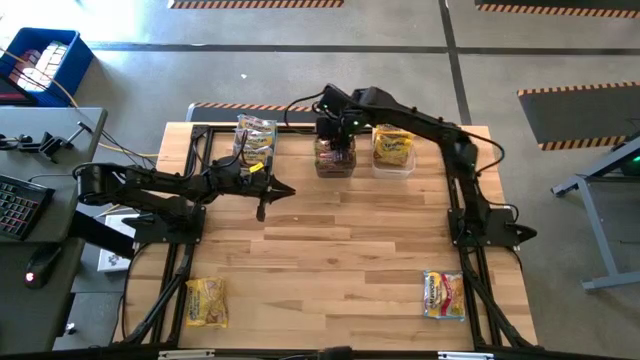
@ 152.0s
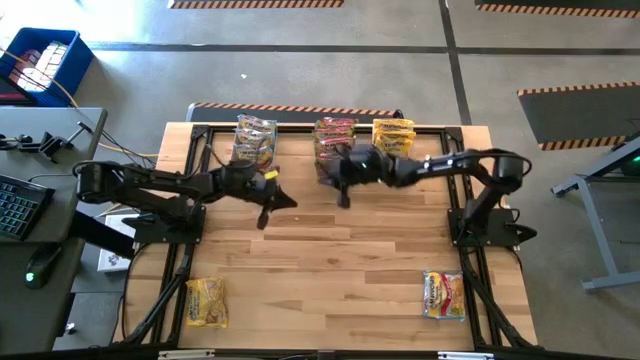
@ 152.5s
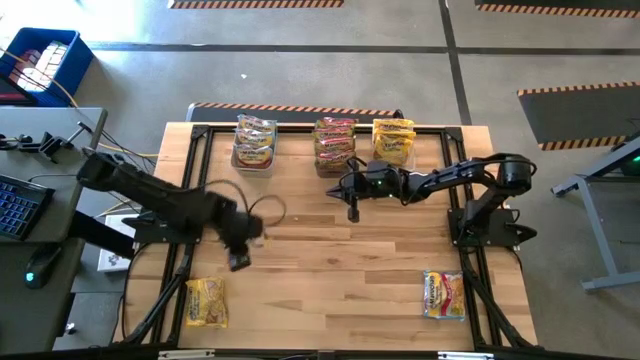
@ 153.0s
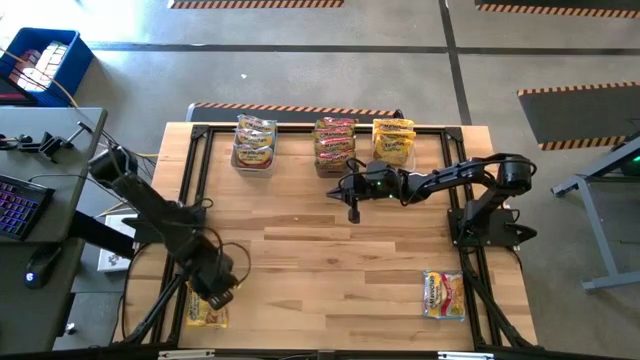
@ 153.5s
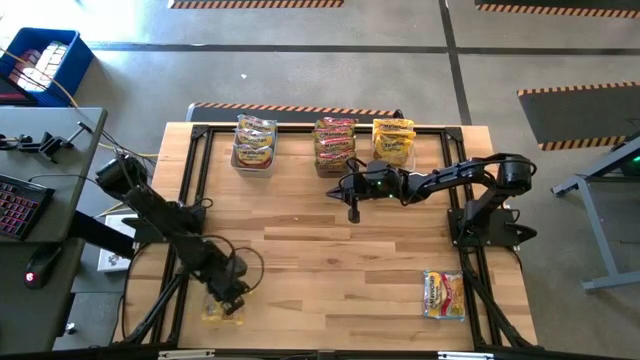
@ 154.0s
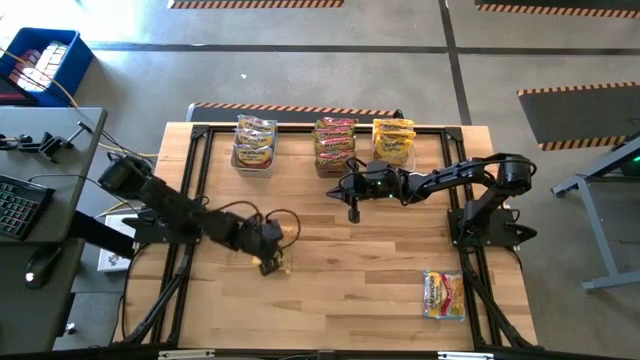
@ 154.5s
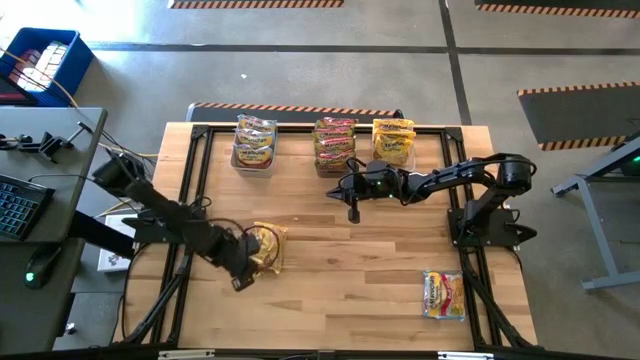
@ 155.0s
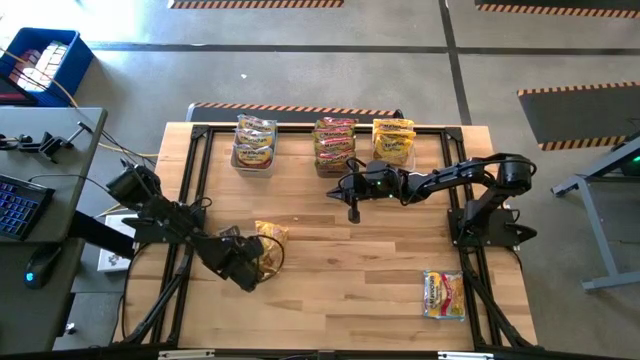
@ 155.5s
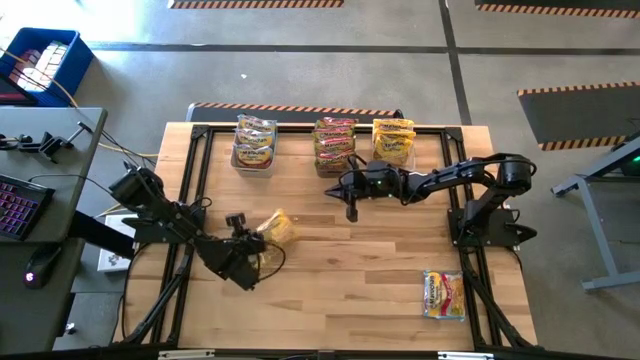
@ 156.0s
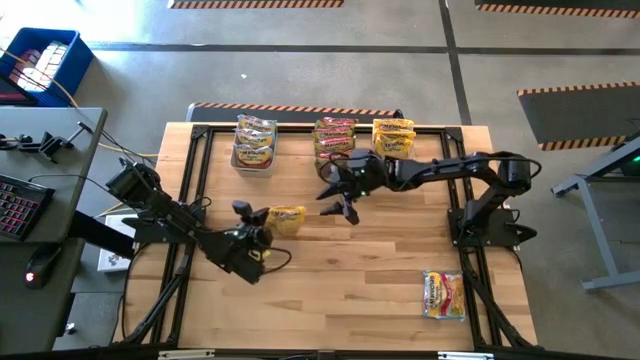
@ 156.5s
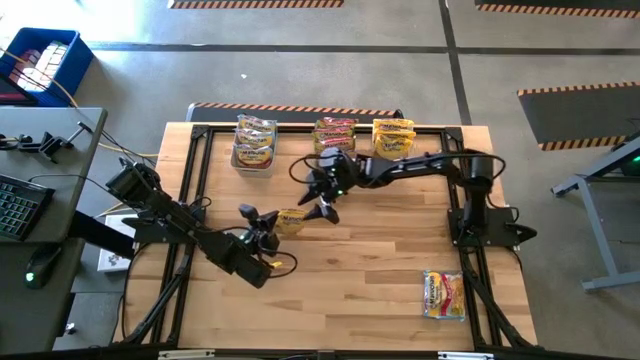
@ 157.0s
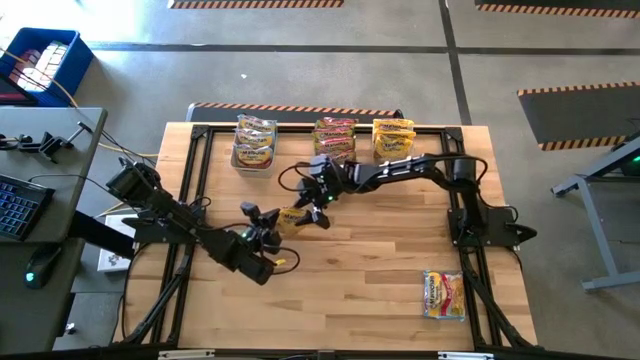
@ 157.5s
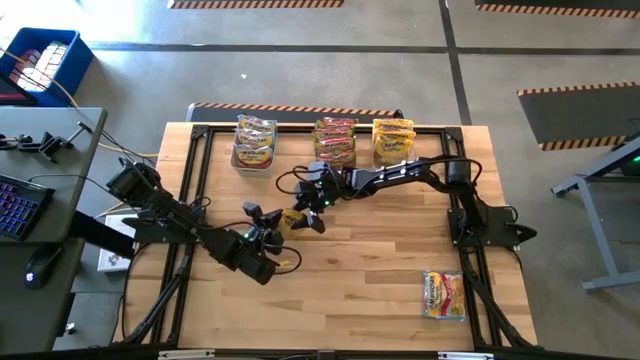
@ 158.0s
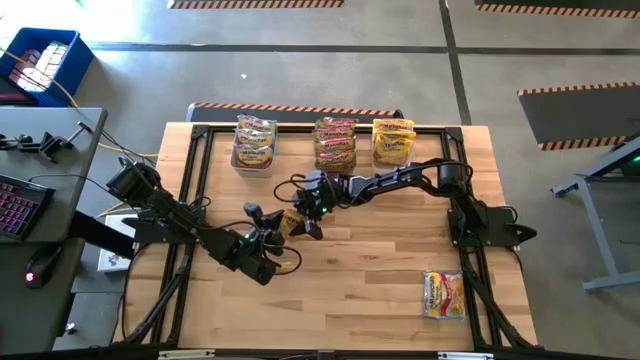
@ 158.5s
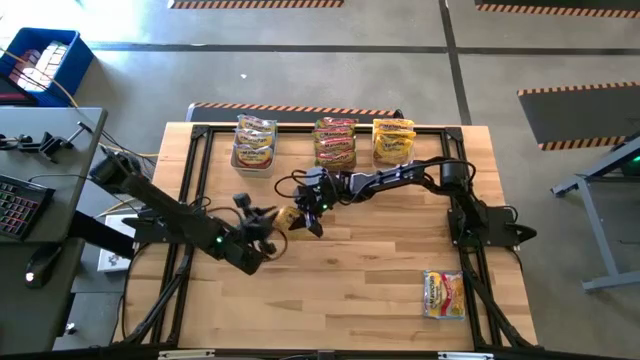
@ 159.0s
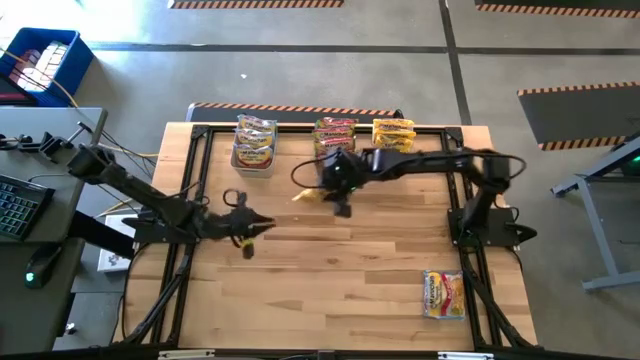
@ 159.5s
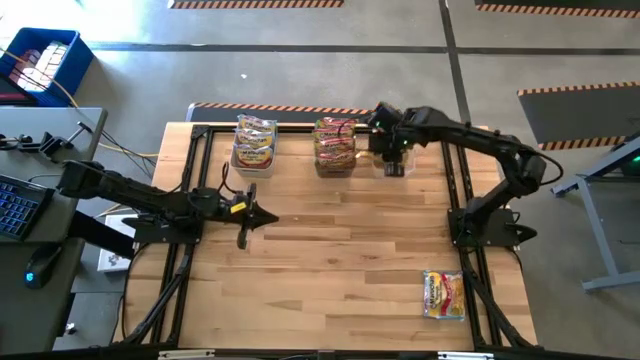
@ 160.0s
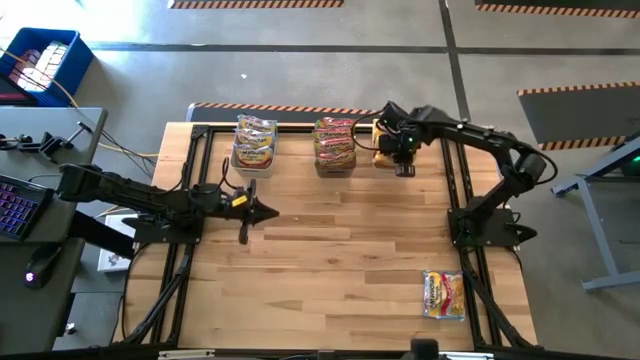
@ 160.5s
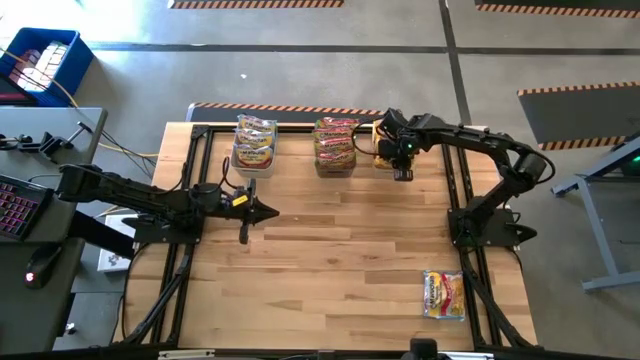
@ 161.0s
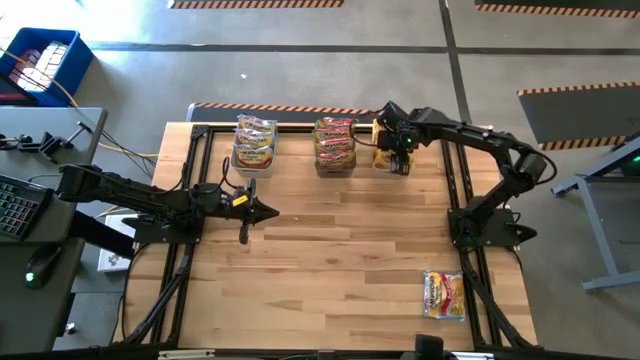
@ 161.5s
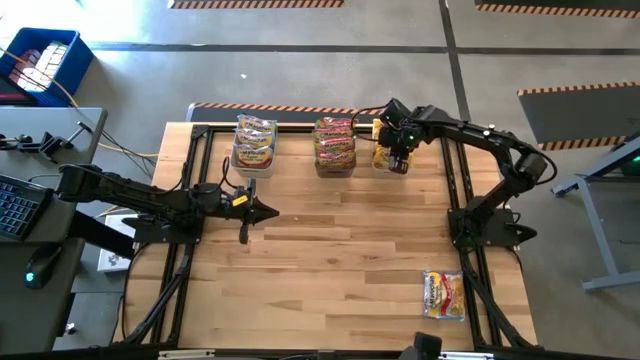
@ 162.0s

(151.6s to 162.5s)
Task: Sort Maruchan noodles
Put the yellow noodle pack into the transparent bin

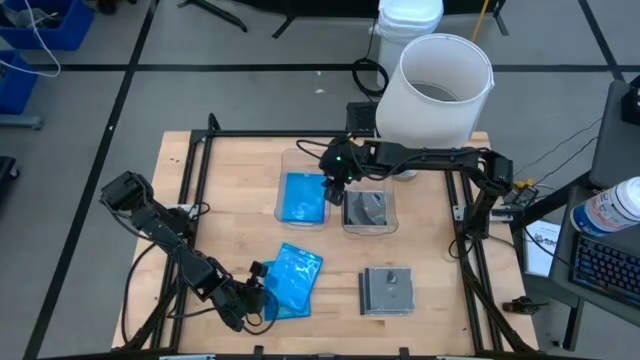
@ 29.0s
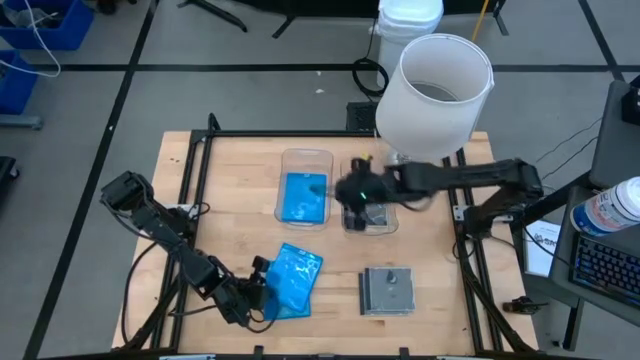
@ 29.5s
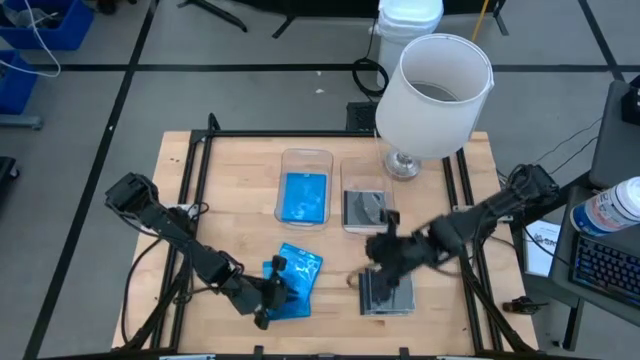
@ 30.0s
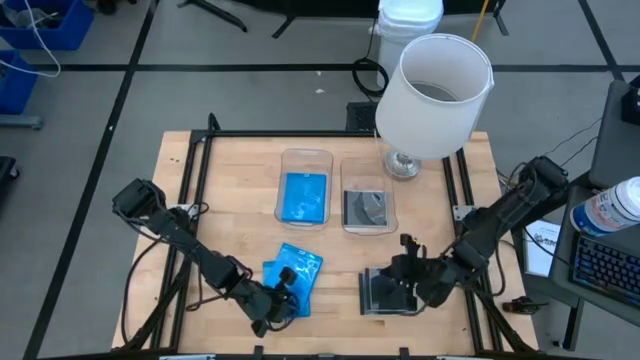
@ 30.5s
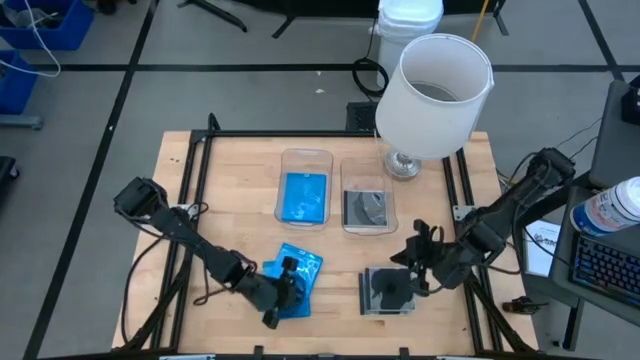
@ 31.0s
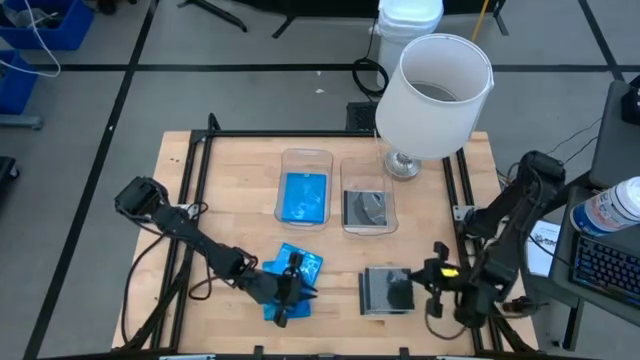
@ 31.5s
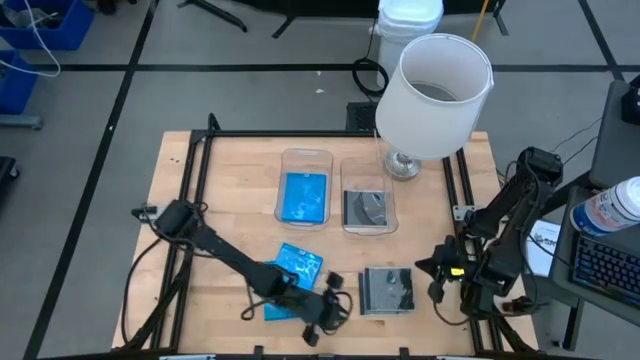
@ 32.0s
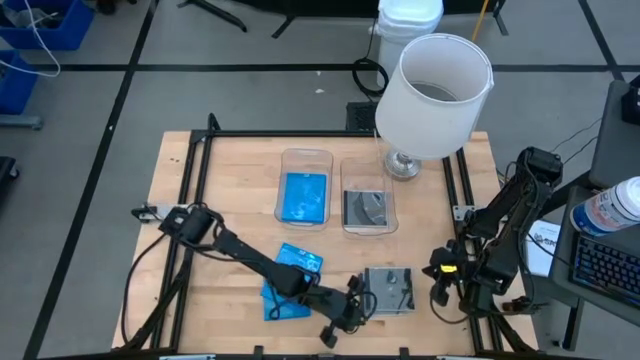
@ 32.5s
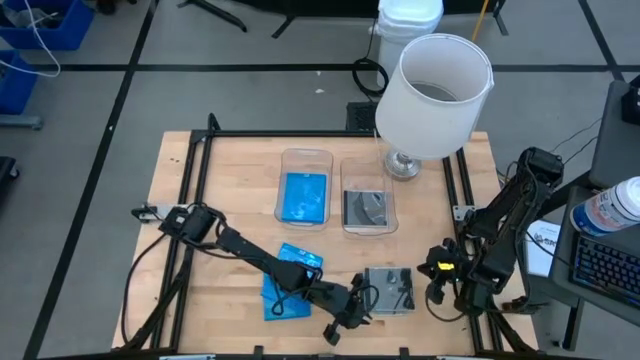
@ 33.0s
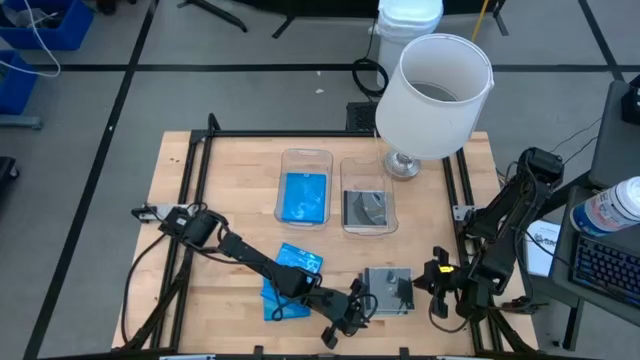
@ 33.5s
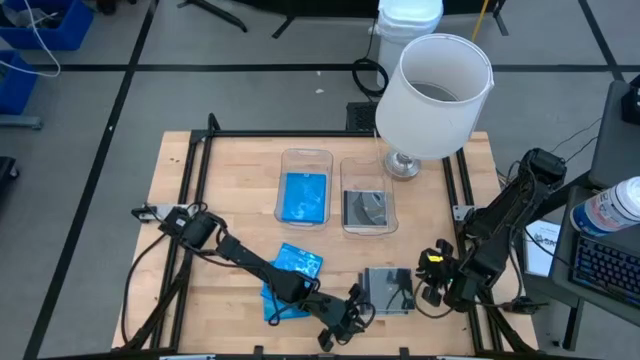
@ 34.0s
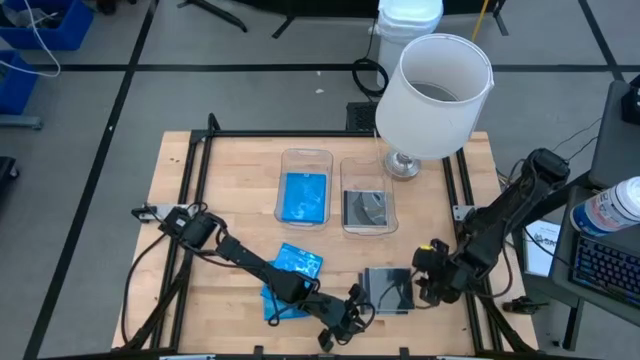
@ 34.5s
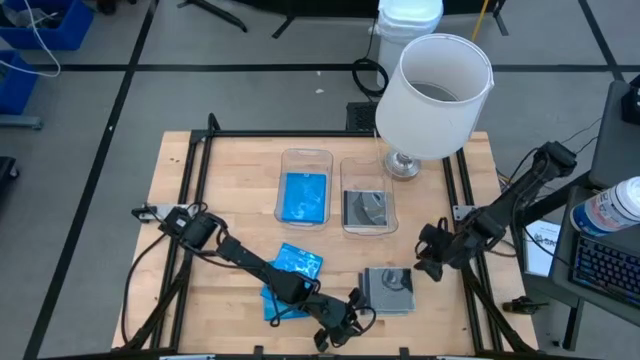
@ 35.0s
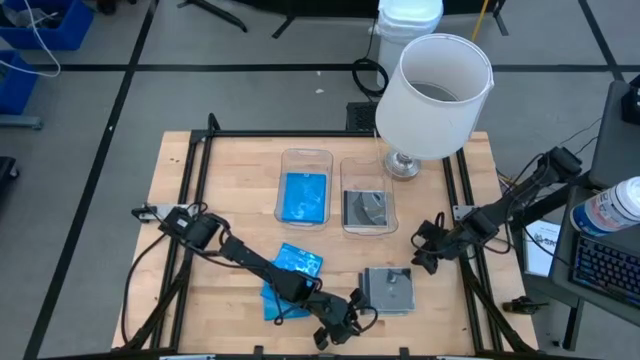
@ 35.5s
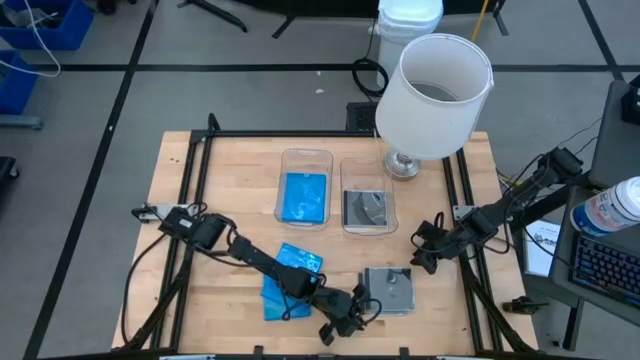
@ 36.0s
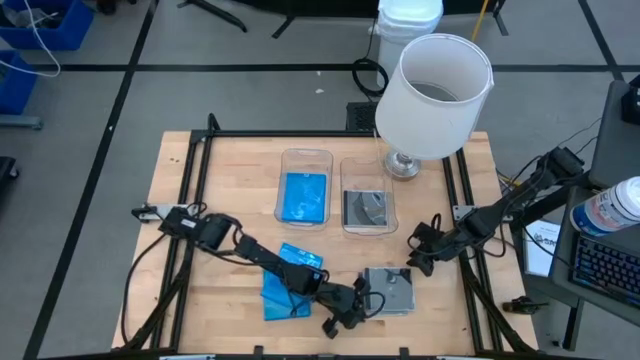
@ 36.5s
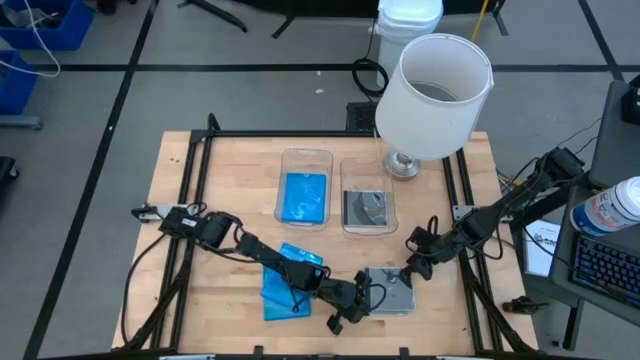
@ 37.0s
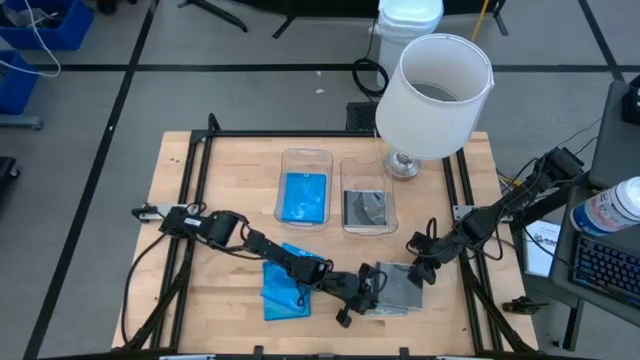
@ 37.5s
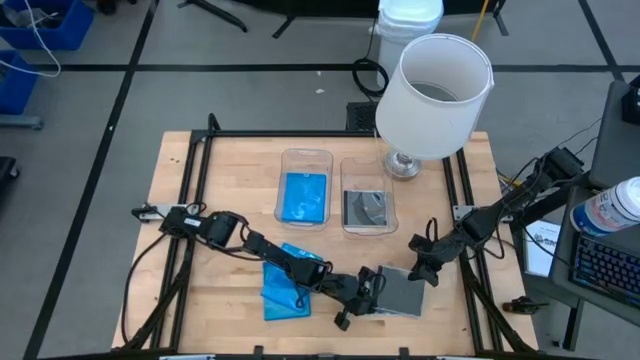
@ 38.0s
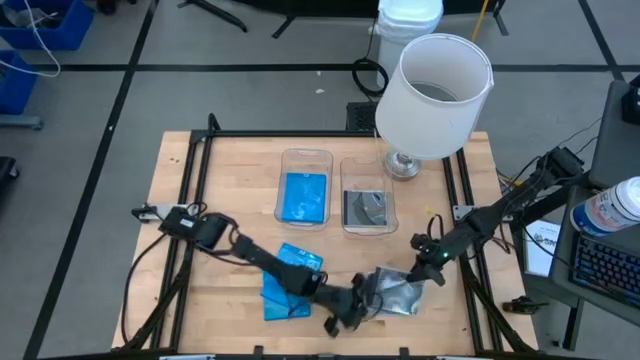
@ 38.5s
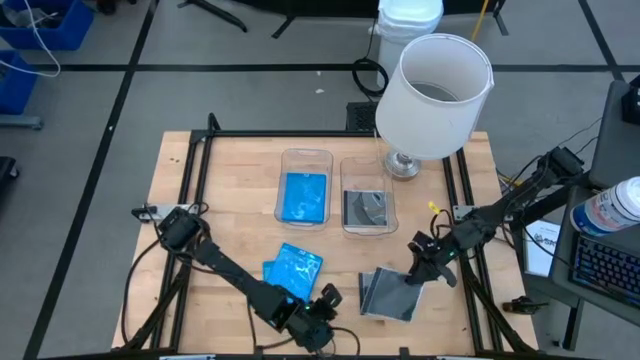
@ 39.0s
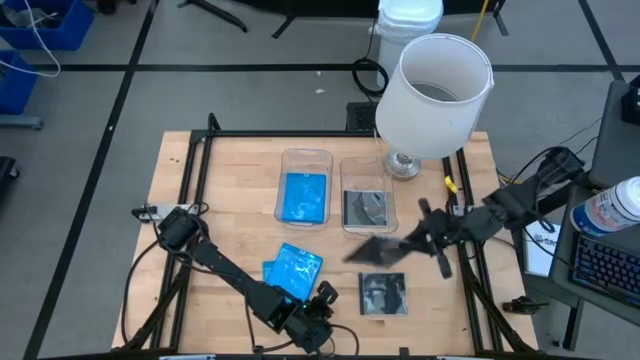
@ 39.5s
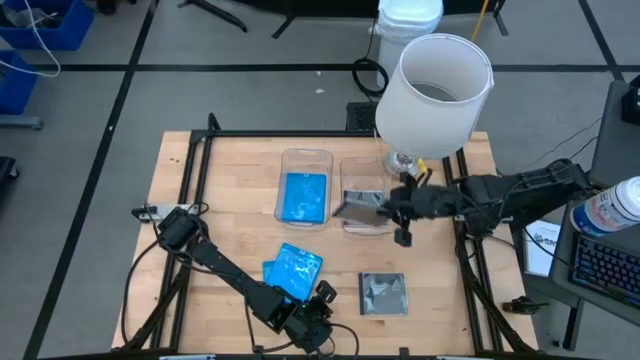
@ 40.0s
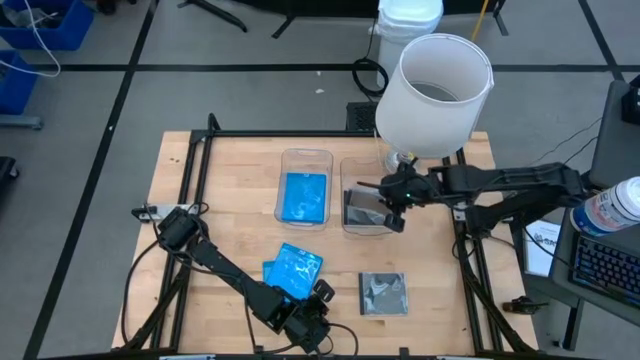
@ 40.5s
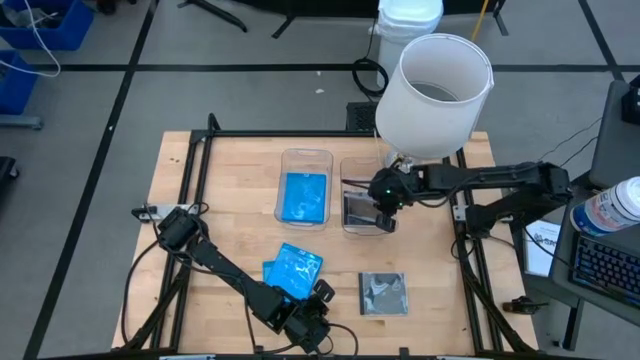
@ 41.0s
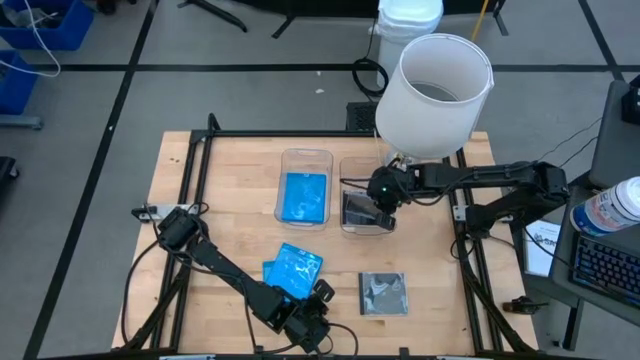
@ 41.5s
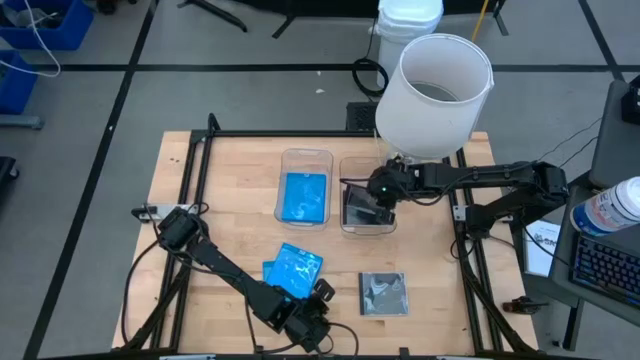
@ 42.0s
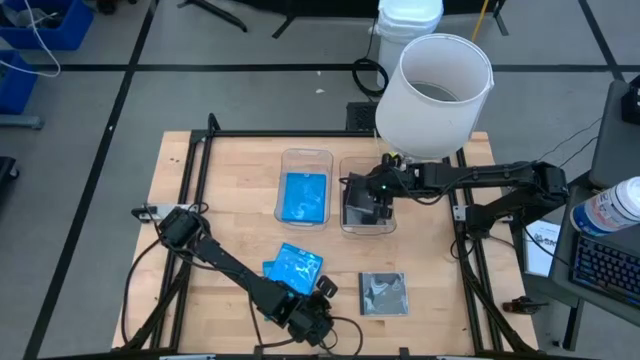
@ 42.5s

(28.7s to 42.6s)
Task: Pick & place jewel cases by type
Put the black cd case into the right transparent bin
